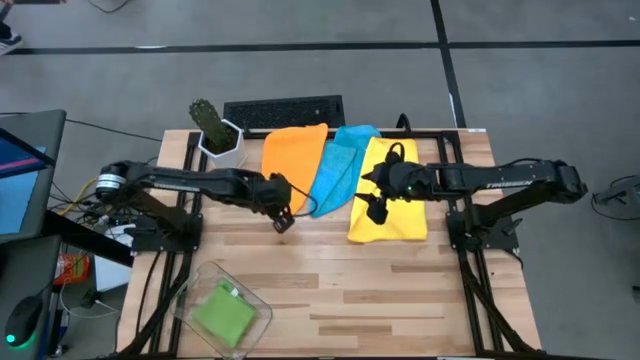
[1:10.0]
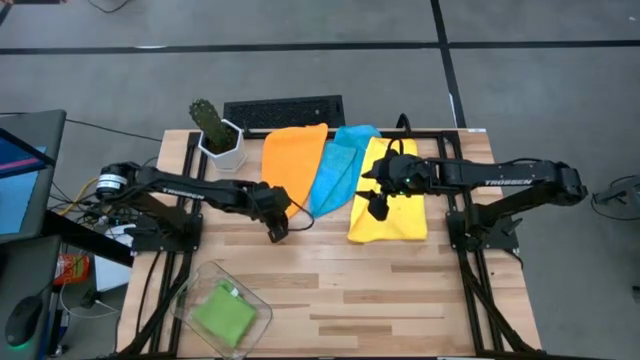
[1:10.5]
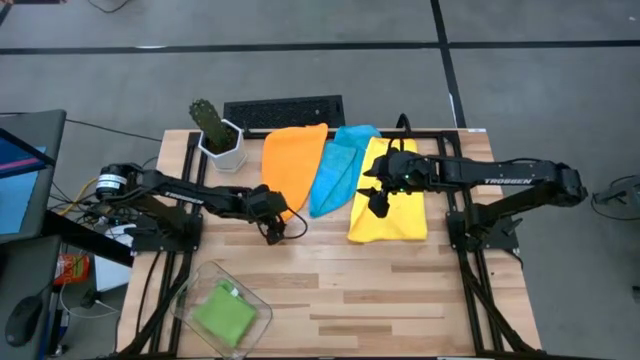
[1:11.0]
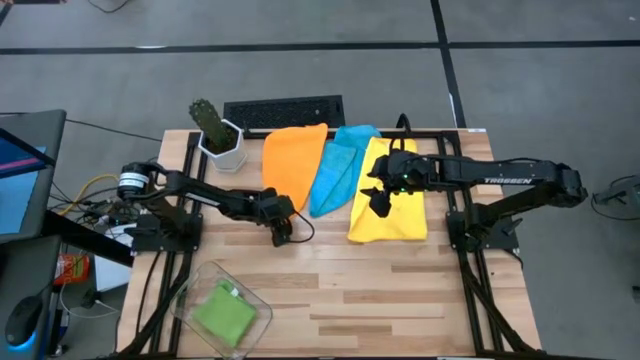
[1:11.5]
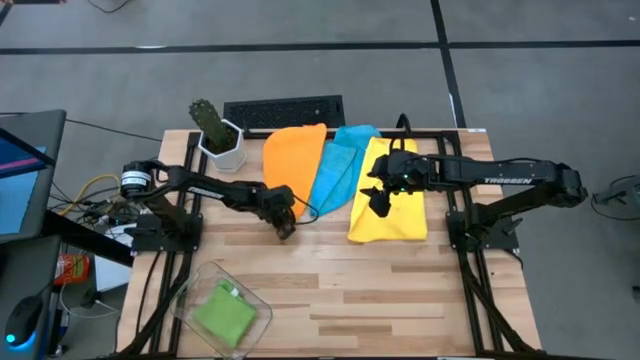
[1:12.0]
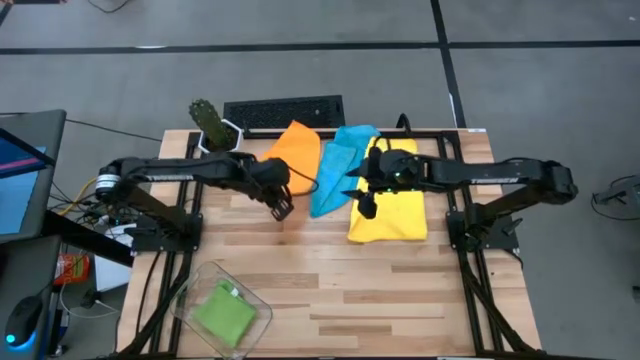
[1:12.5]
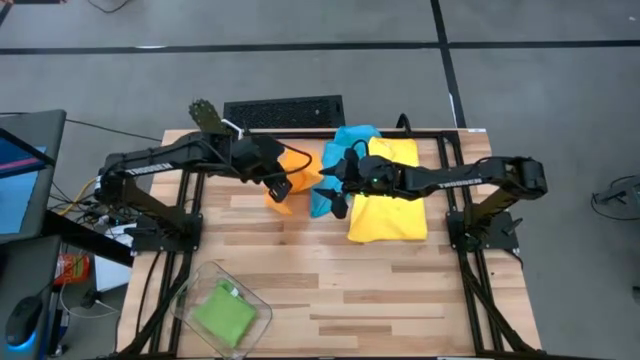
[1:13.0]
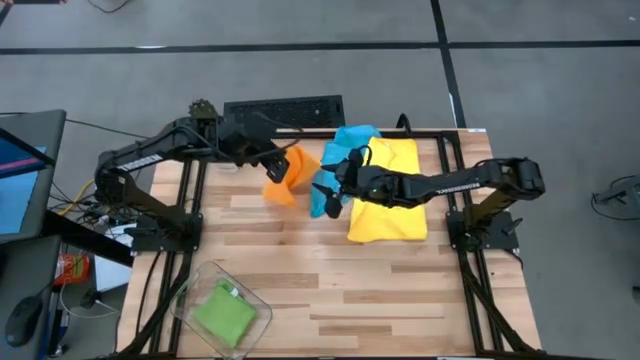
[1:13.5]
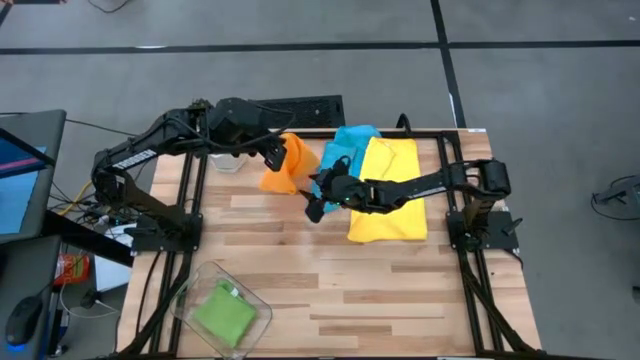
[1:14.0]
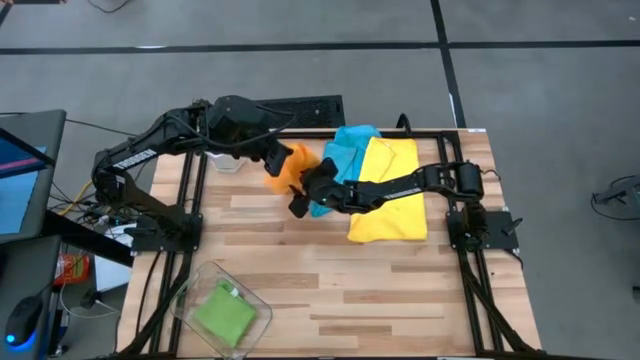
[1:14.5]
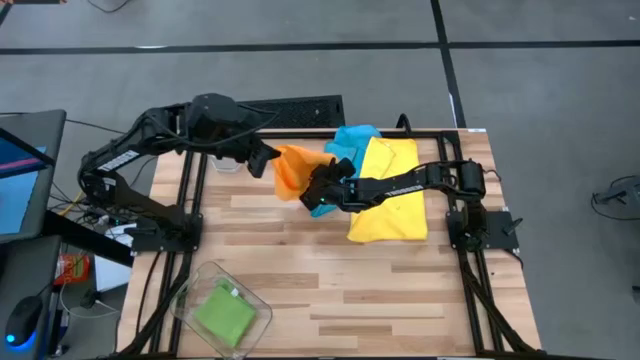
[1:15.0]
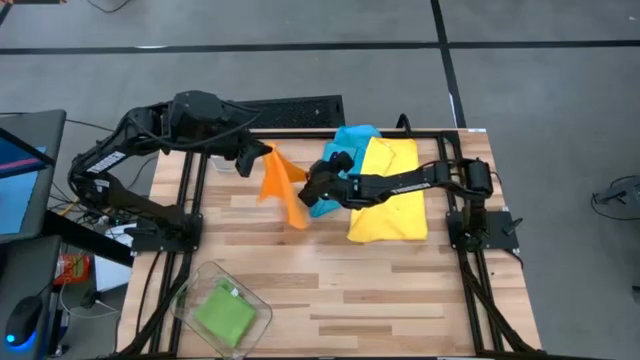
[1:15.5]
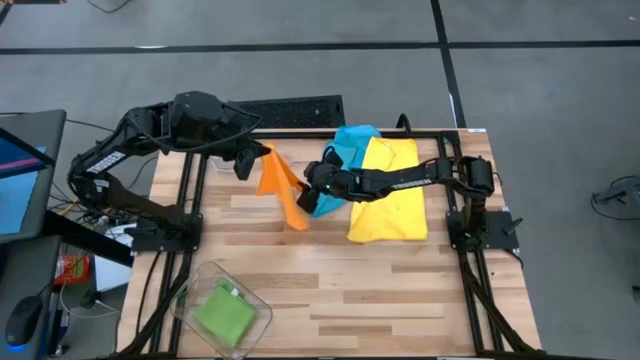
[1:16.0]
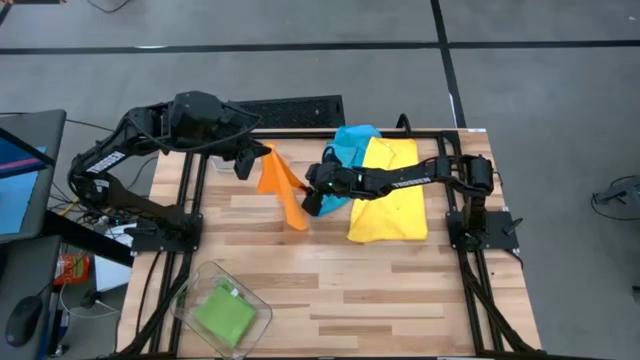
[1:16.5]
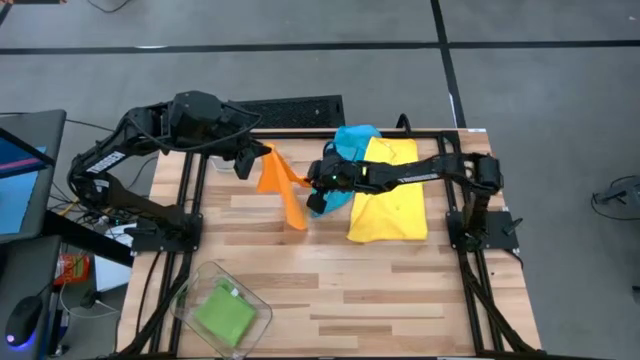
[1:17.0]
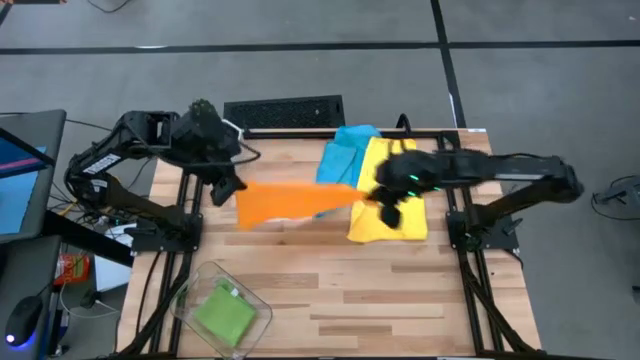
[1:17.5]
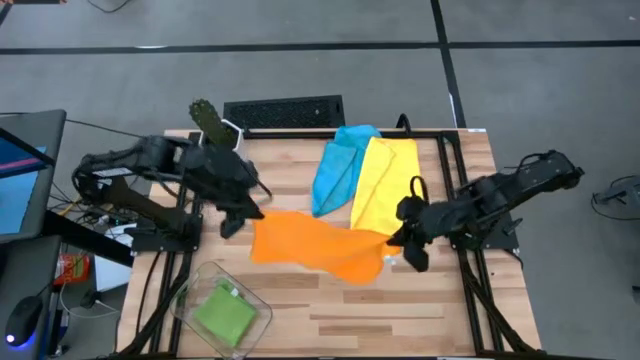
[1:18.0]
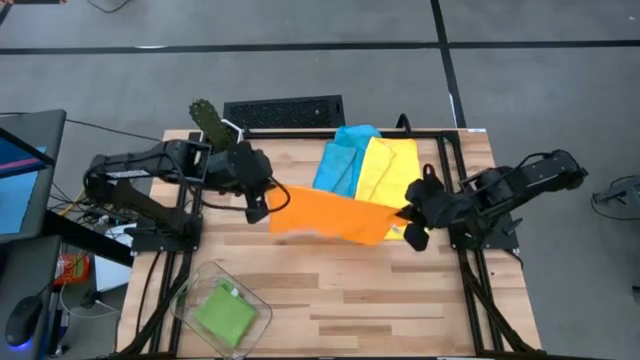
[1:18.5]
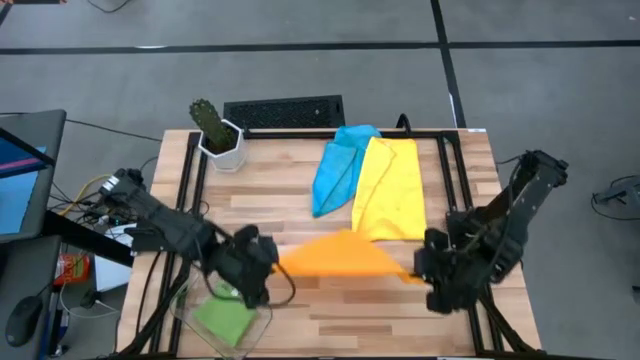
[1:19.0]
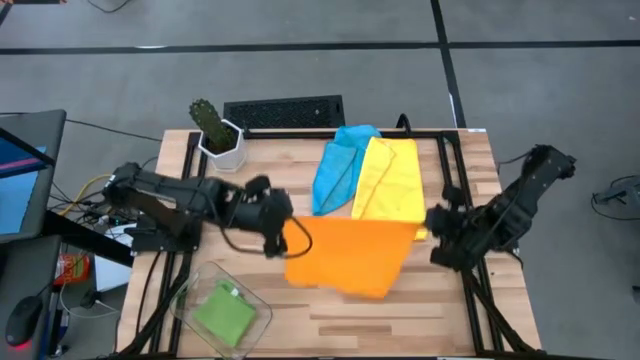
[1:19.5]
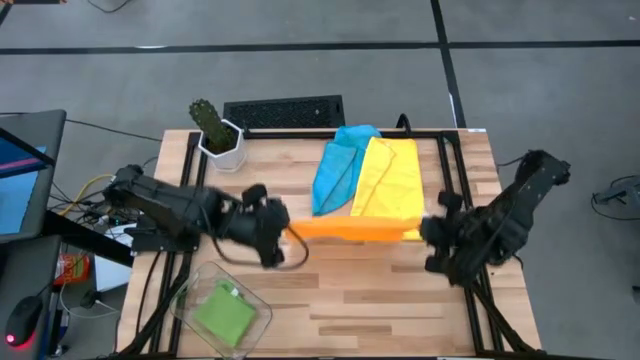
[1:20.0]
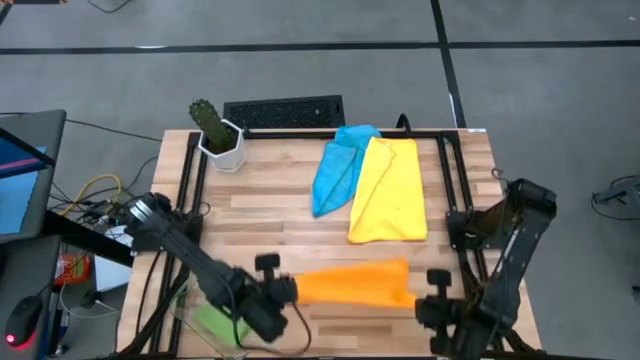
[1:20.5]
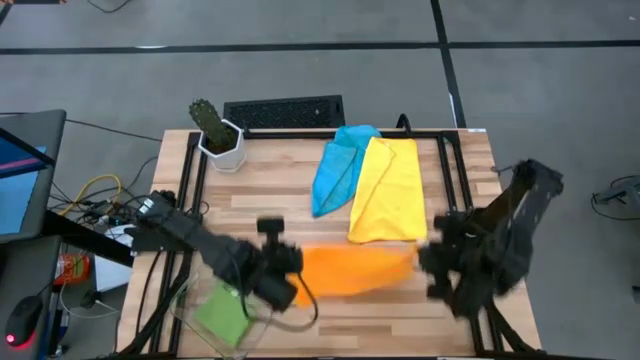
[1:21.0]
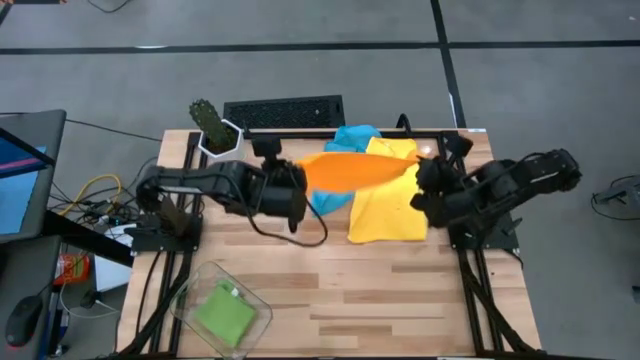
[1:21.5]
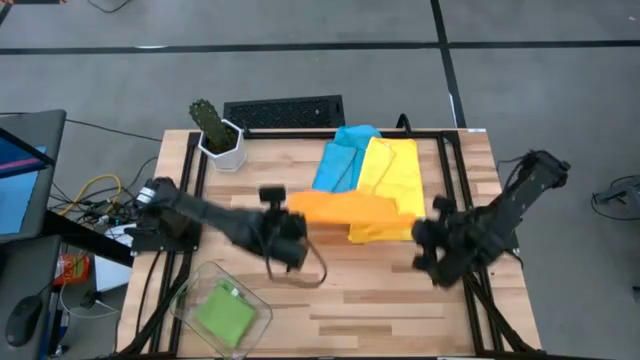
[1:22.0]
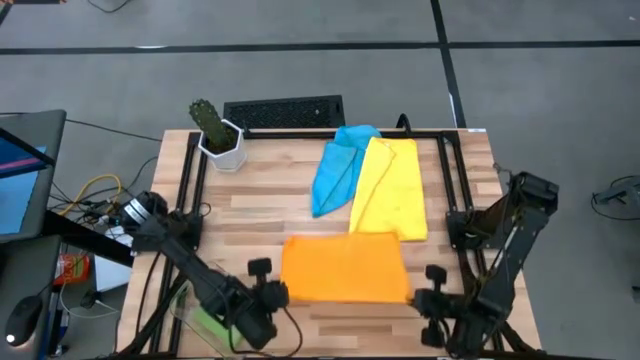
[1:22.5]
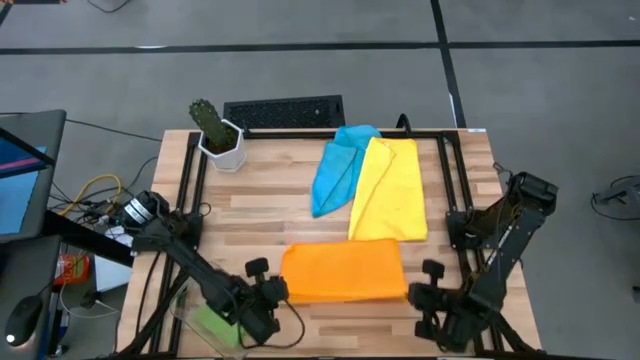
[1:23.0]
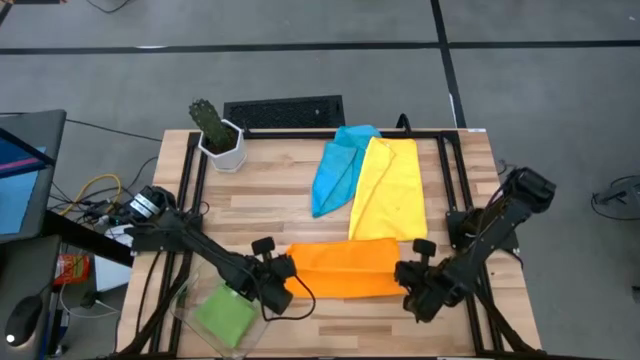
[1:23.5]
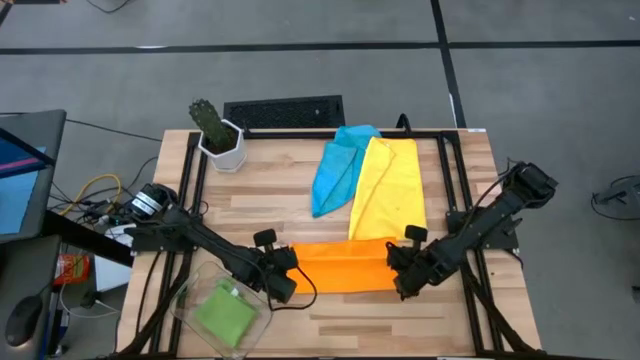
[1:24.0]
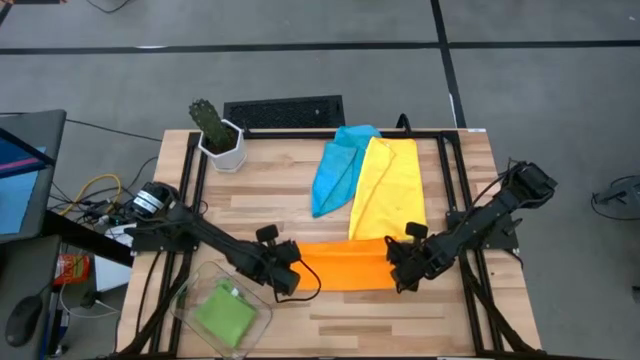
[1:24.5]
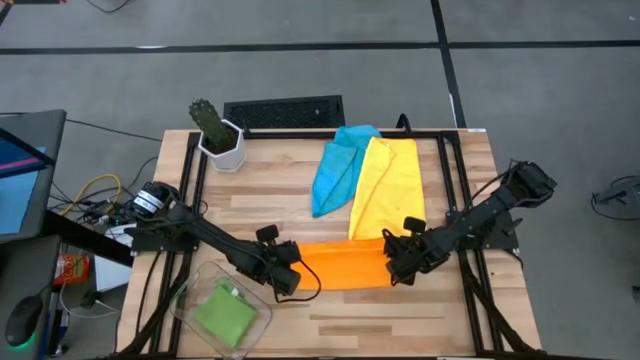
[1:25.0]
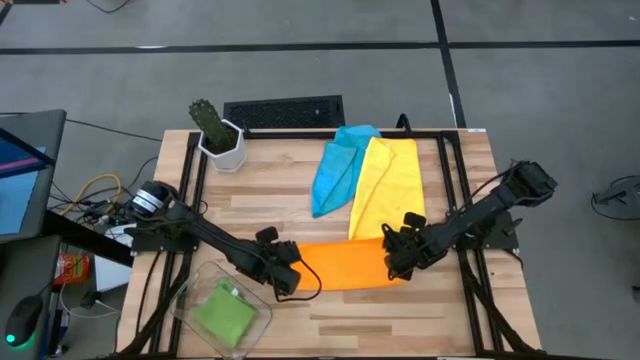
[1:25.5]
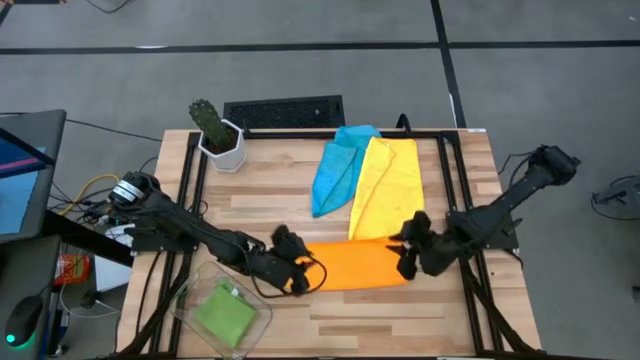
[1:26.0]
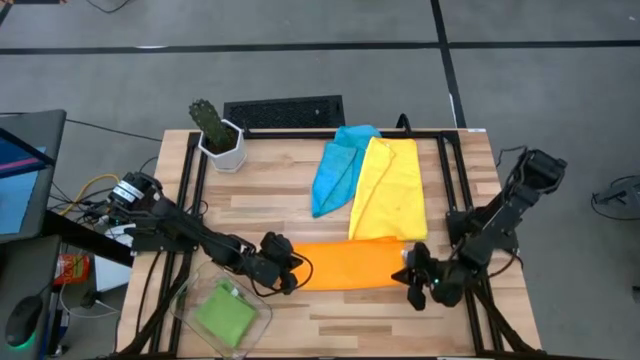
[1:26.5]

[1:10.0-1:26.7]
Task: Fold microfiber towels
Fold the orange microfiber towel

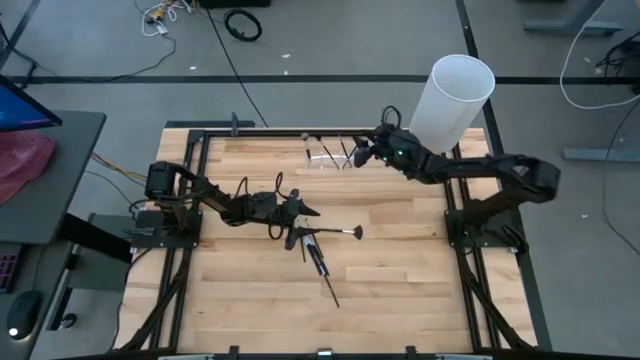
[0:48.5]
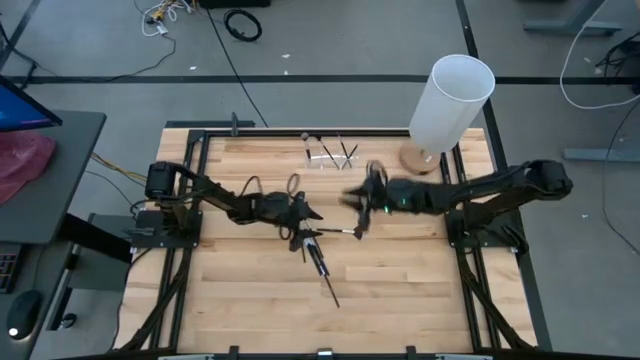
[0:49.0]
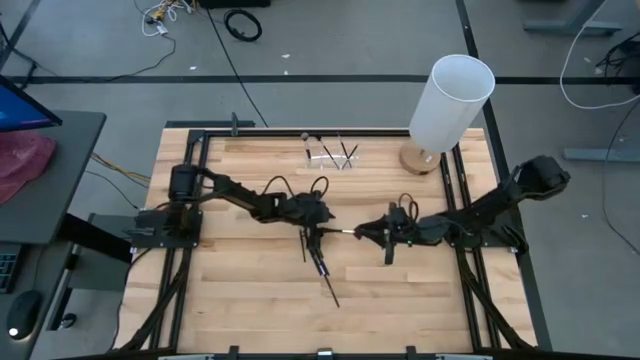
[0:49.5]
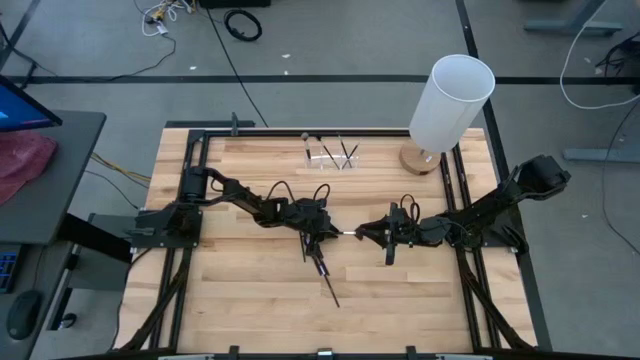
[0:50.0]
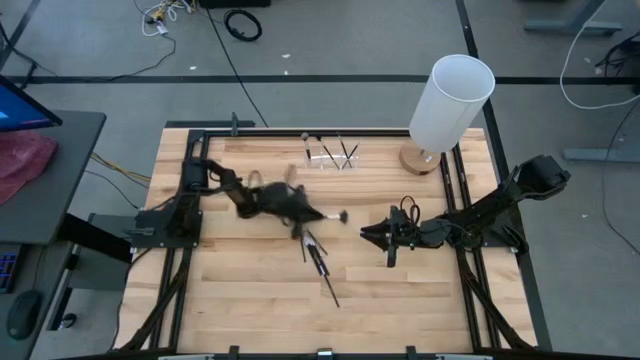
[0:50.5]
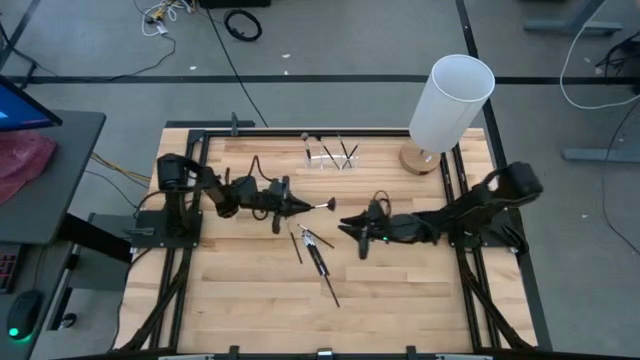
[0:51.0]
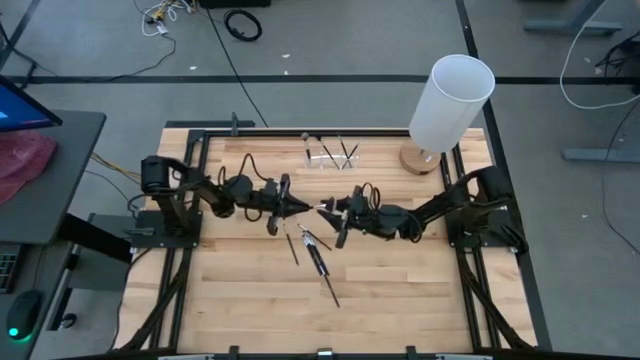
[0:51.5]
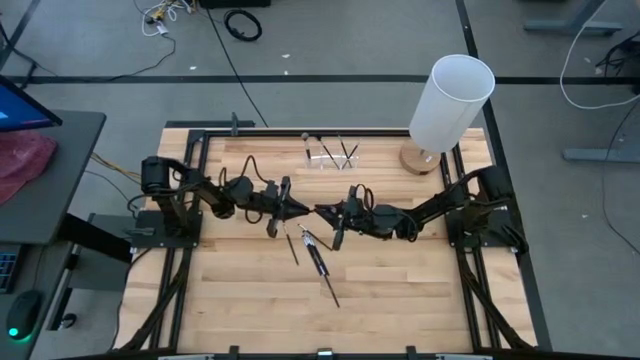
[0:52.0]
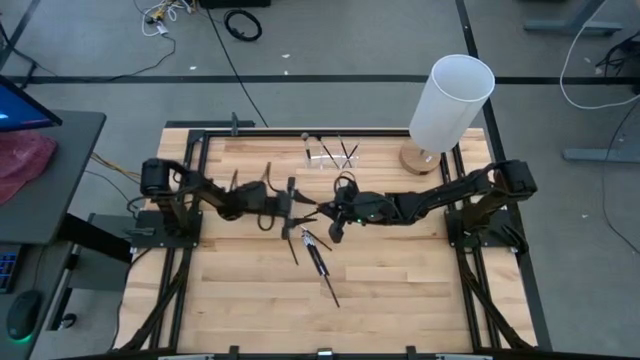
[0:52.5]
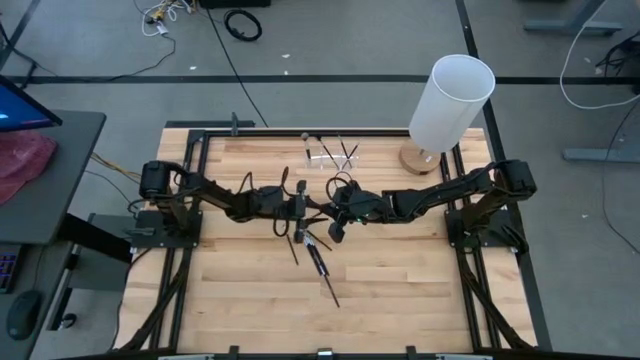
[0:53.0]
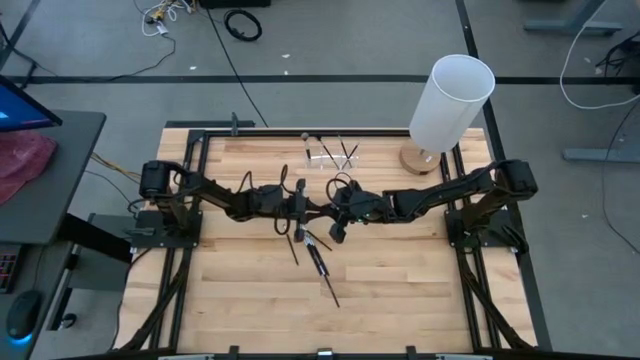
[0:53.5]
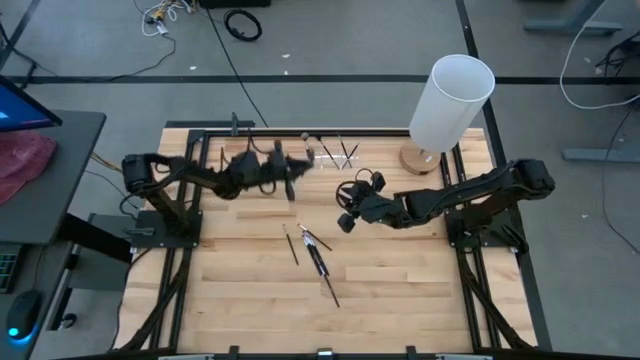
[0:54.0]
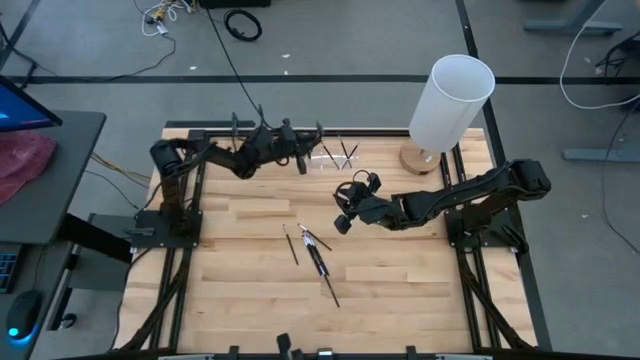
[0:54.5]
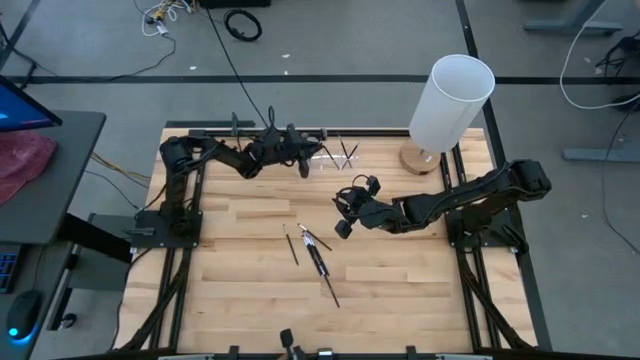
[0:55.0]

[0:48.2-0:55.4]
Task: Pick & Place Makeup Supplies
Put the black makeup brush into the transparent organizer
